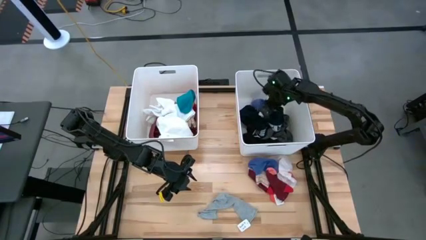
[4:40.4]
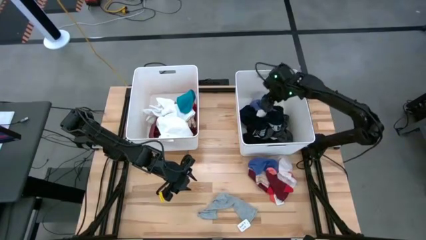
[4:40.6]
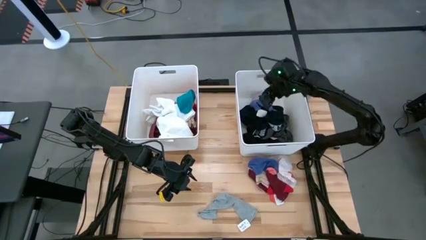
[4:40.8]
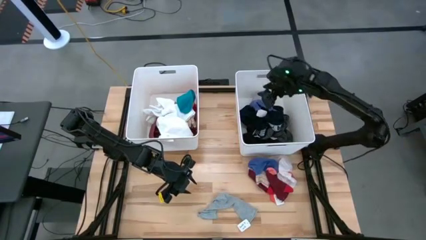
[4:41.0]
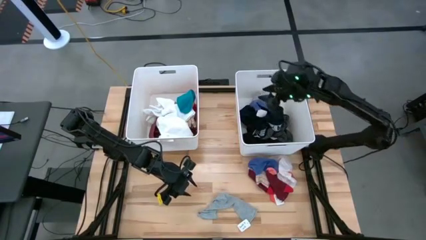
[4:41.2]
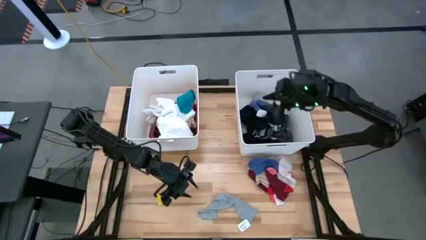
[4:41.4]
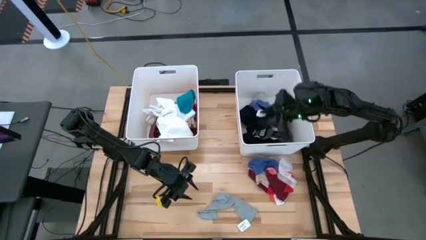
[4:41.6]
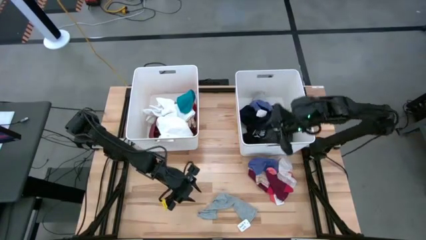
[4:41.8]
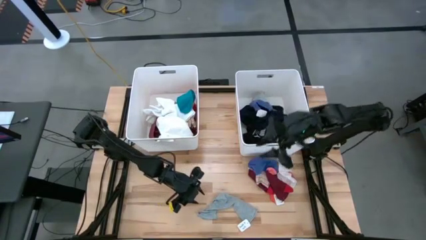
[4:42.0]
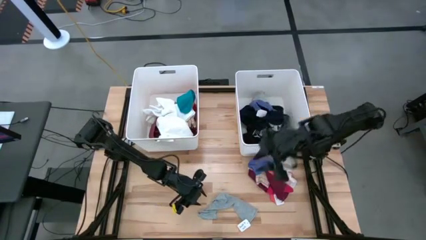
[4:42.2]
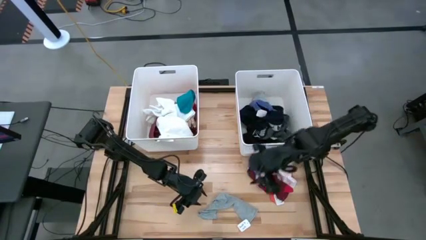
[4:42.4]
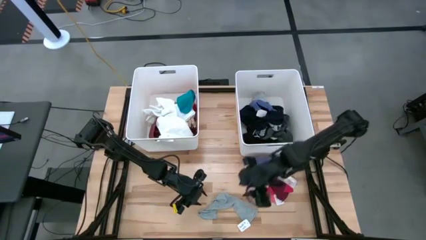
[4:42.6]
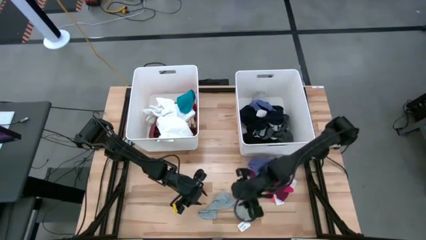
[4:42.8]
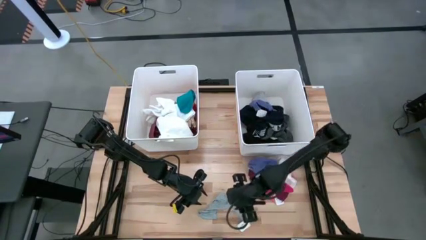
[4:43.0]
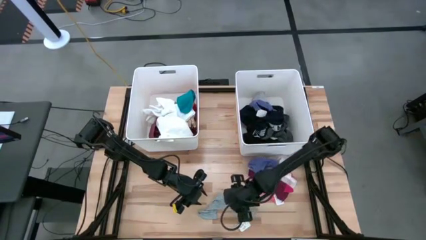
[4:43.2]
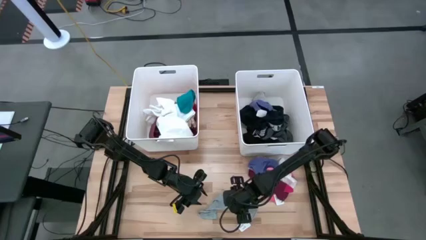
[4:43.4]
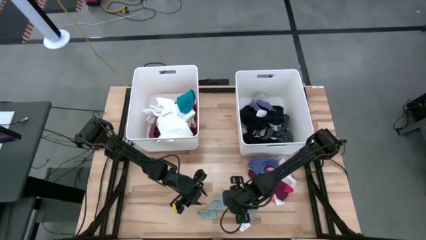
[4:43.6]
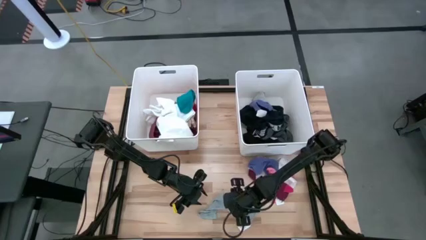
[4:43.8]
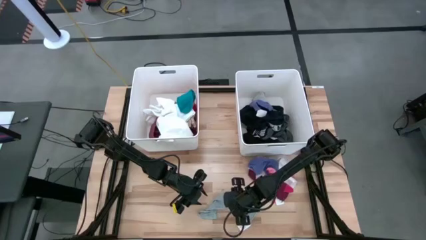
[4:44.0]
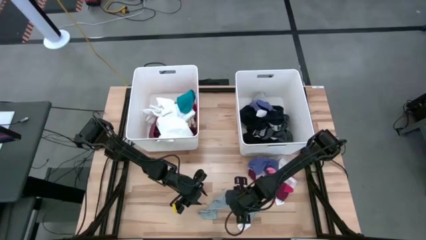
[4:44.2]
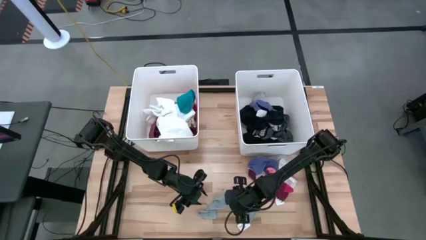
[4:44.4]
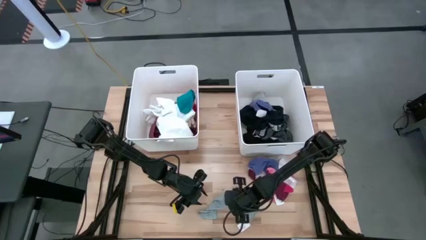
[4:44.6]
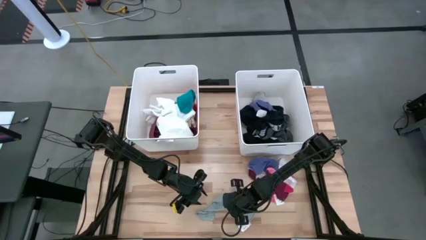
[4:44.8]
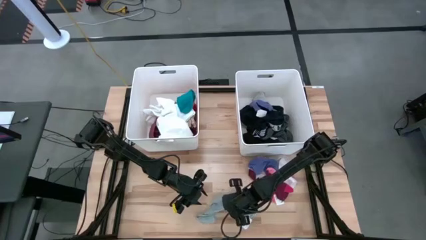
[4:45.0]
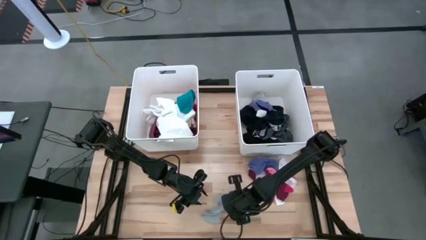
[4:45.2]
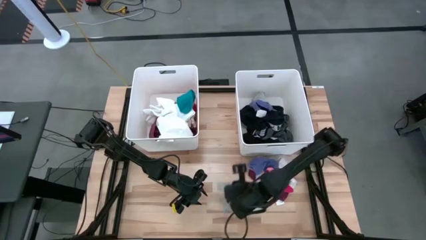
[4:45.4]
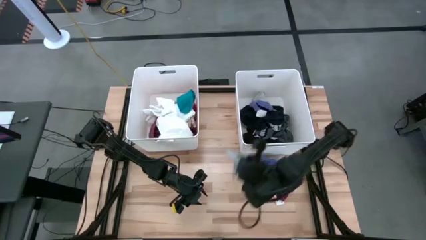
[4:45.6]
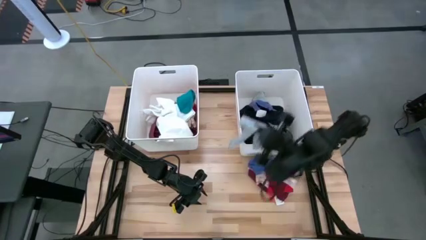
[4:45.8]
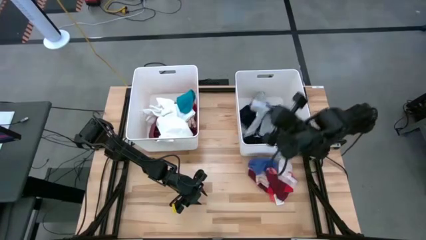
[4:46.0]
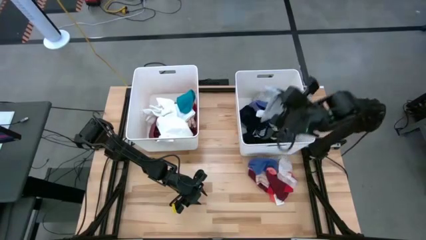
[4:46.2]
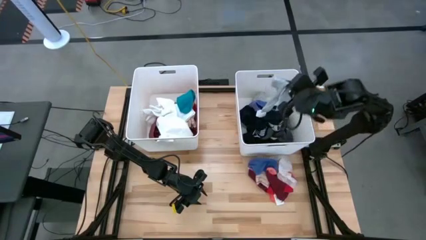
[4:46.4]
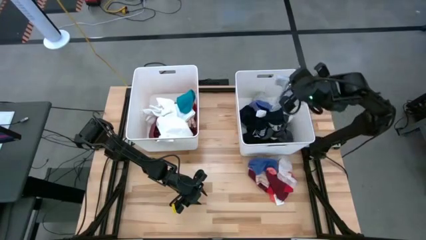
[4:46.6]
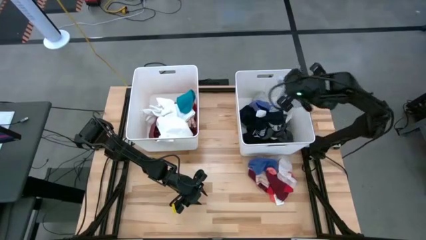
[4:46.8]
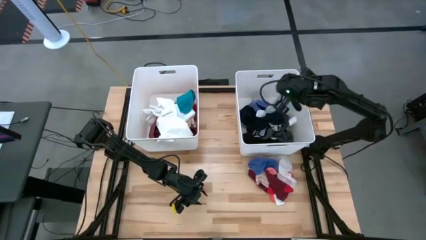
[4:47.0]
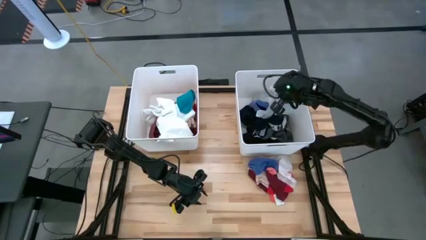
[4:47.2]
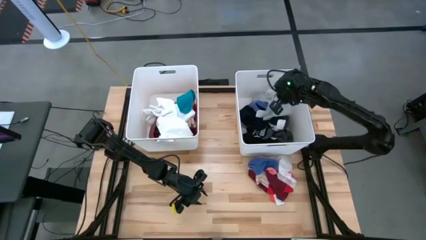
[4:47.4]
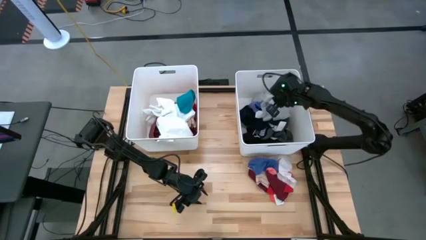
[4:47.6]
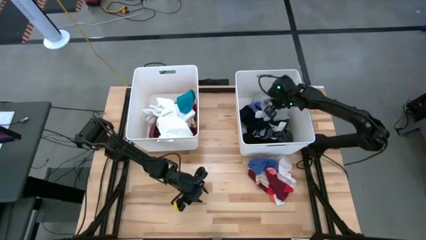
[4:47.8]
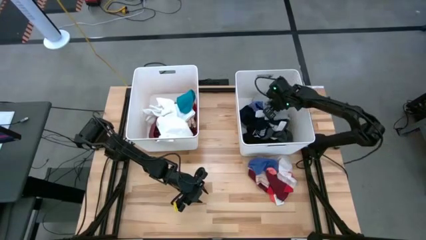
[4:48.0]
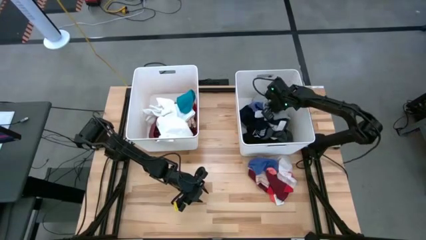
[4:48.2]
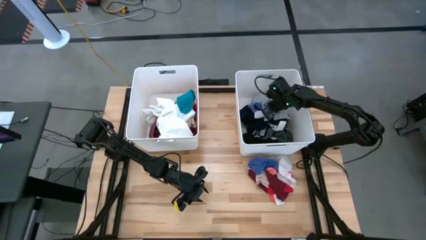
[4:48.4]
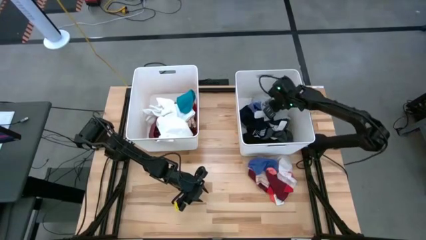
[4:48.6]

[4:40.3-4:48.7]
Task: Sort clothes
Put the gray sock into the right white bin
